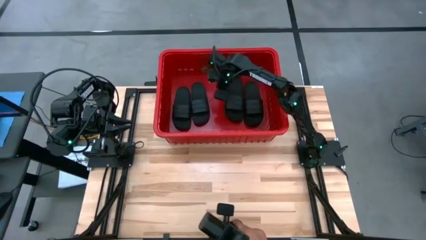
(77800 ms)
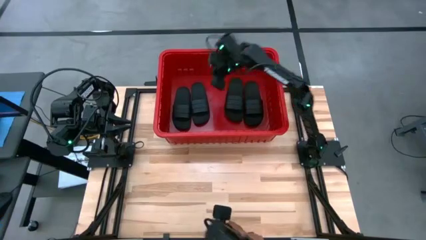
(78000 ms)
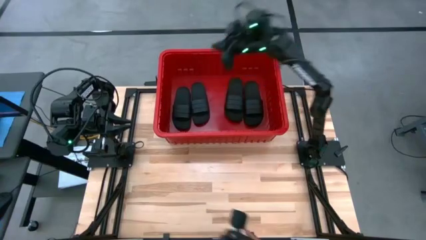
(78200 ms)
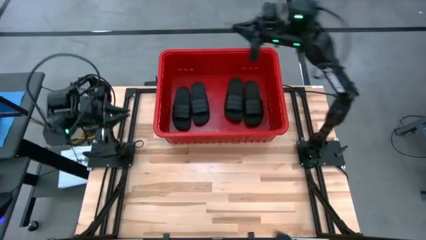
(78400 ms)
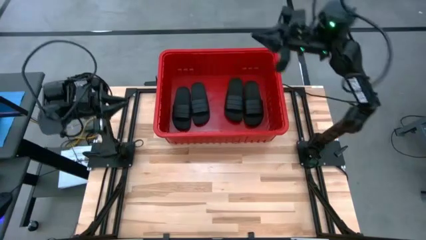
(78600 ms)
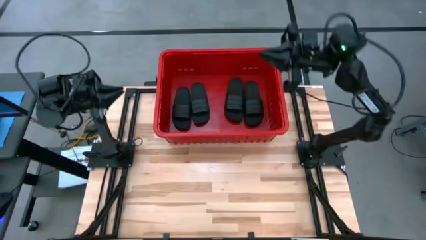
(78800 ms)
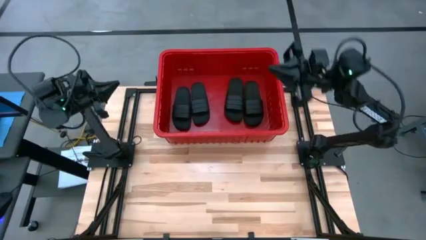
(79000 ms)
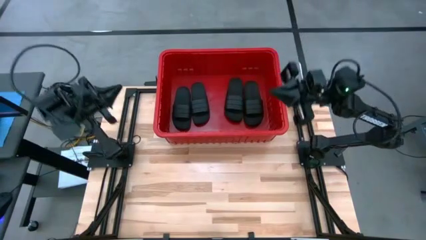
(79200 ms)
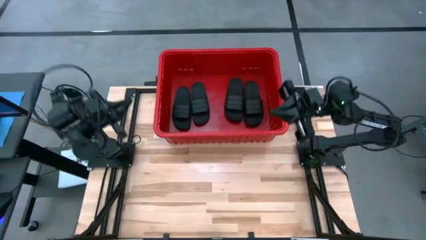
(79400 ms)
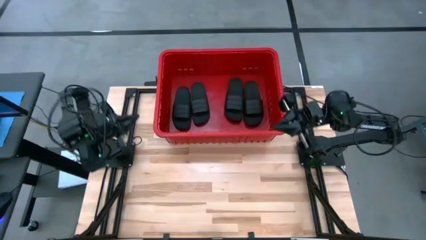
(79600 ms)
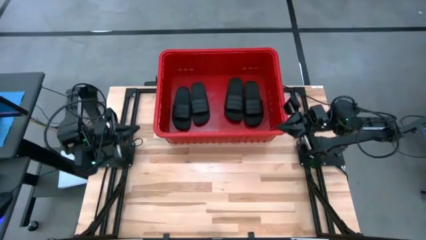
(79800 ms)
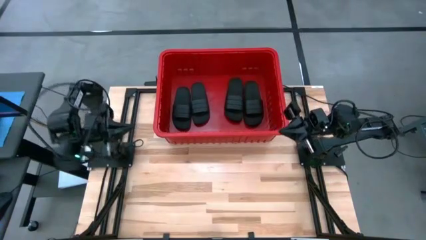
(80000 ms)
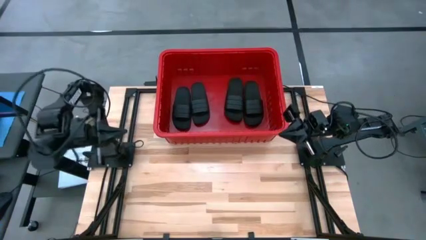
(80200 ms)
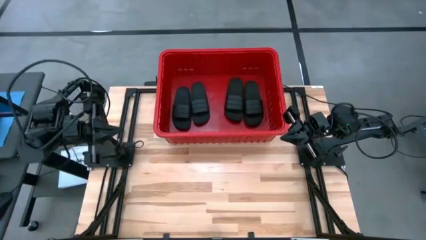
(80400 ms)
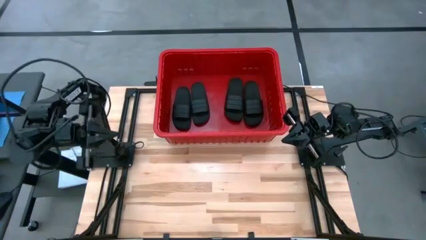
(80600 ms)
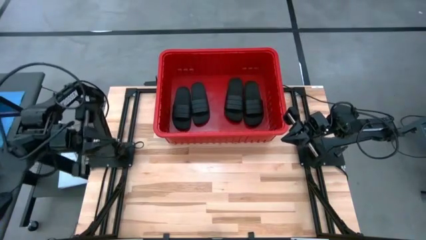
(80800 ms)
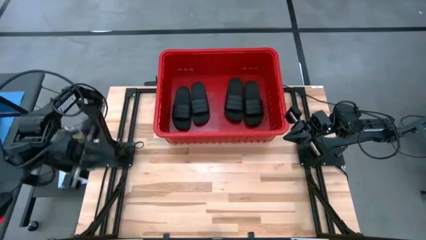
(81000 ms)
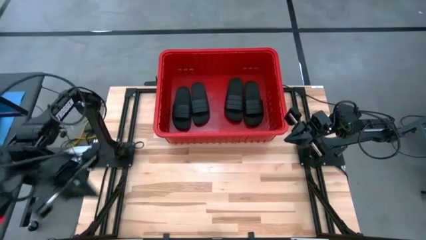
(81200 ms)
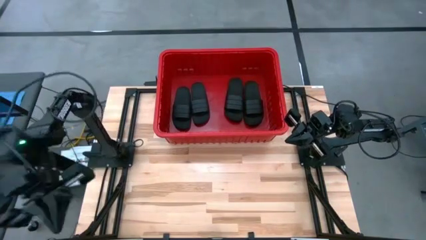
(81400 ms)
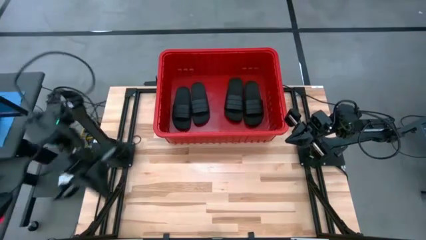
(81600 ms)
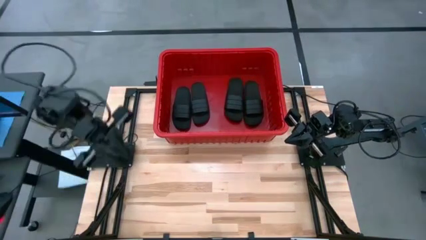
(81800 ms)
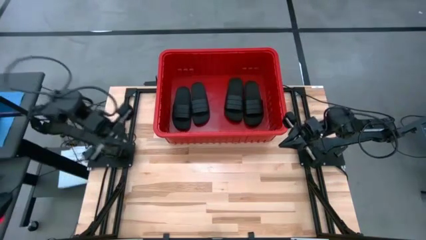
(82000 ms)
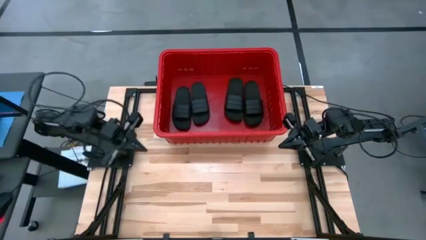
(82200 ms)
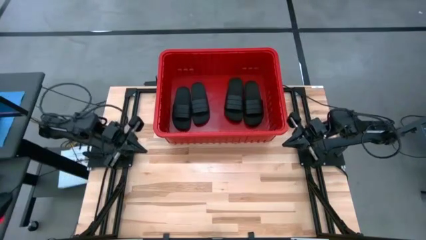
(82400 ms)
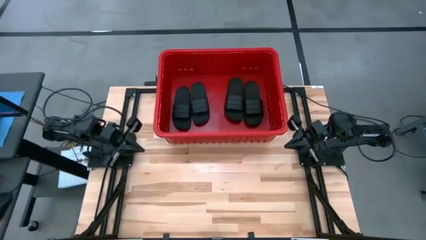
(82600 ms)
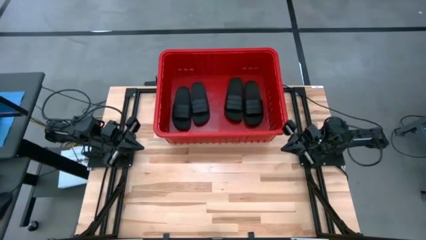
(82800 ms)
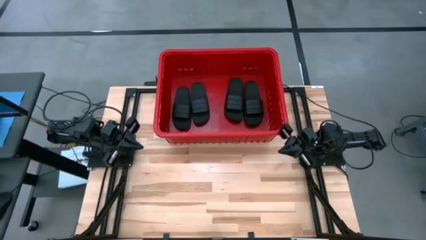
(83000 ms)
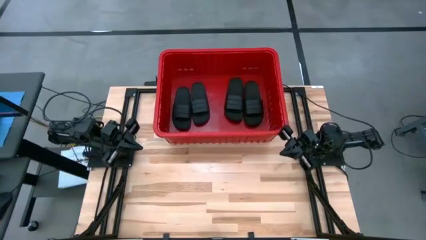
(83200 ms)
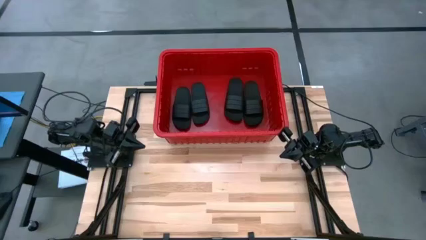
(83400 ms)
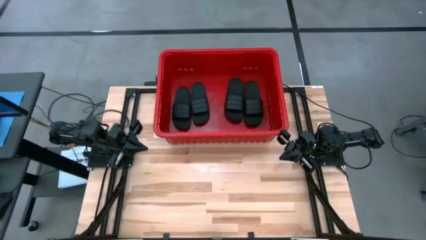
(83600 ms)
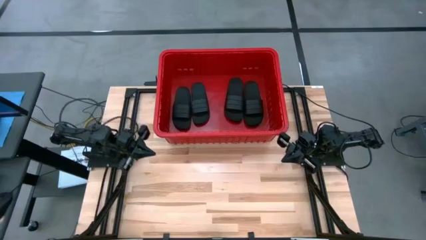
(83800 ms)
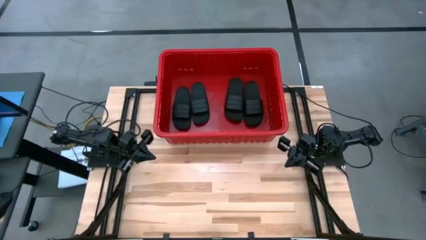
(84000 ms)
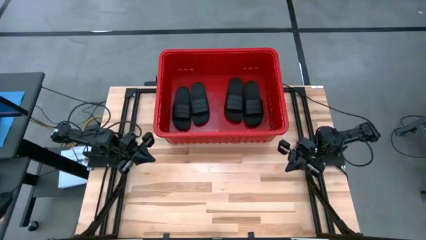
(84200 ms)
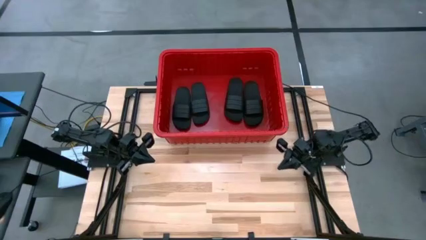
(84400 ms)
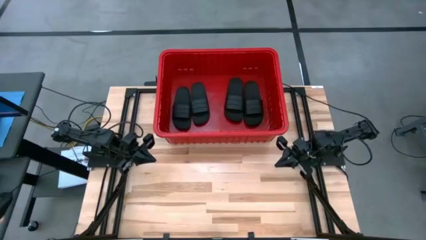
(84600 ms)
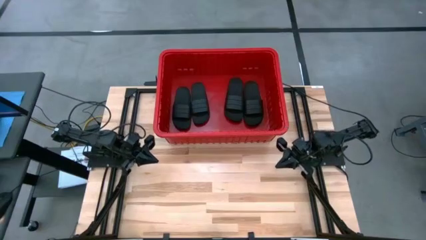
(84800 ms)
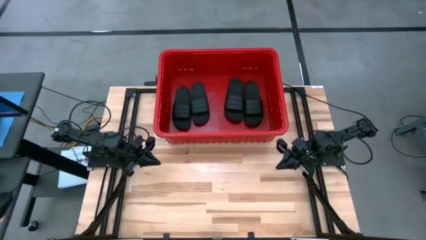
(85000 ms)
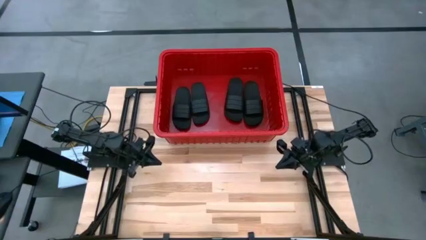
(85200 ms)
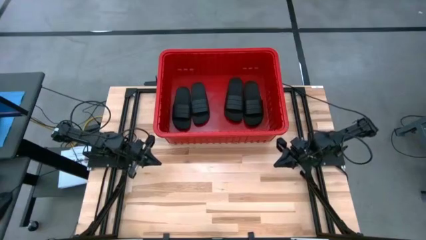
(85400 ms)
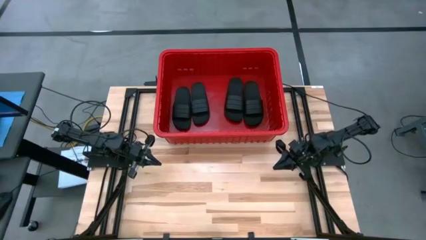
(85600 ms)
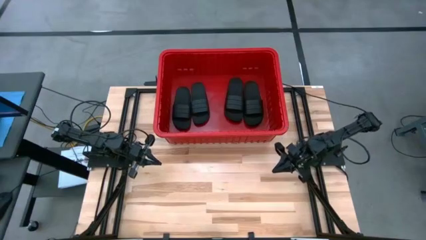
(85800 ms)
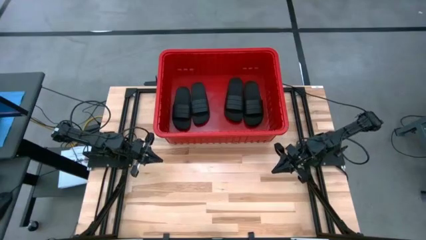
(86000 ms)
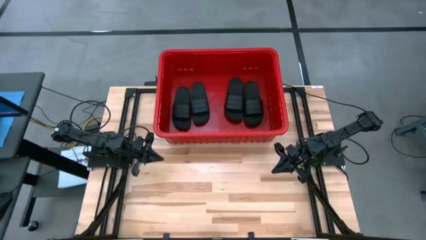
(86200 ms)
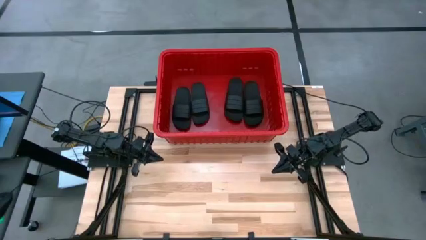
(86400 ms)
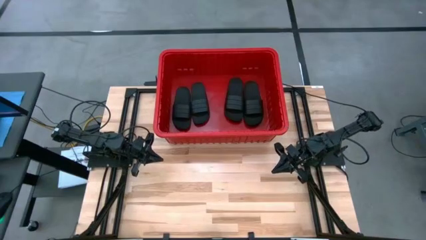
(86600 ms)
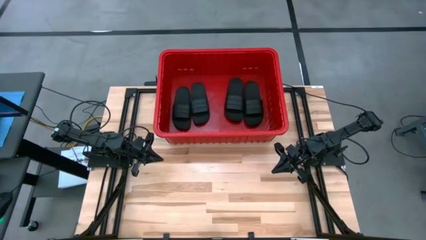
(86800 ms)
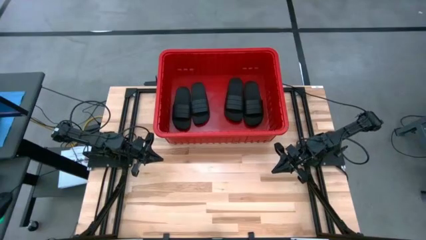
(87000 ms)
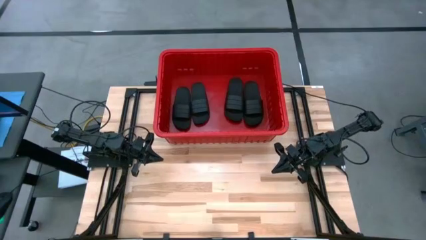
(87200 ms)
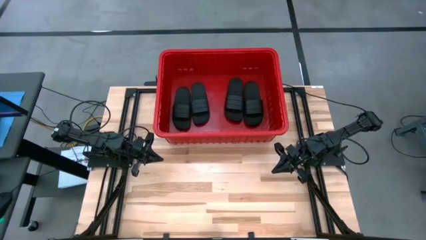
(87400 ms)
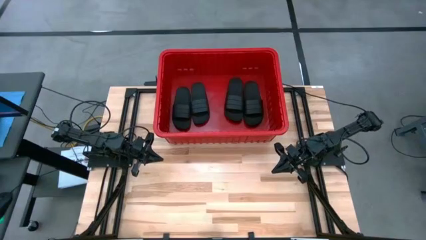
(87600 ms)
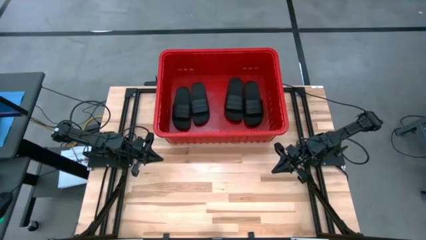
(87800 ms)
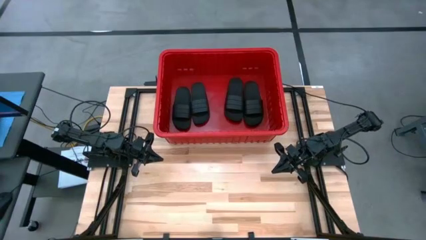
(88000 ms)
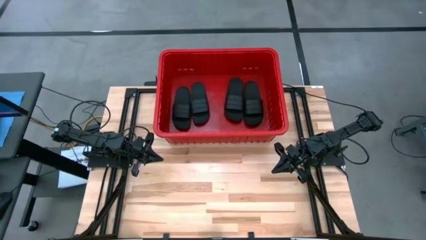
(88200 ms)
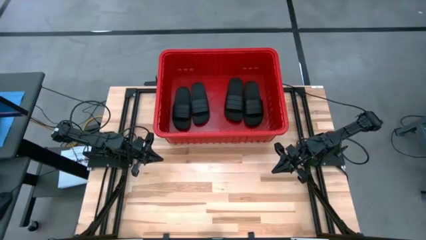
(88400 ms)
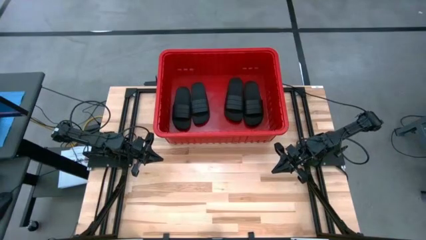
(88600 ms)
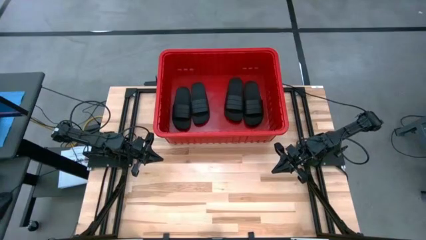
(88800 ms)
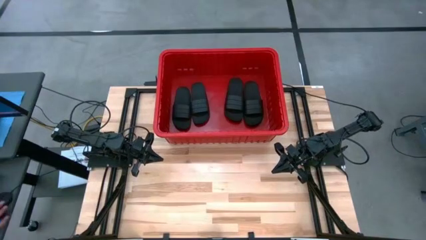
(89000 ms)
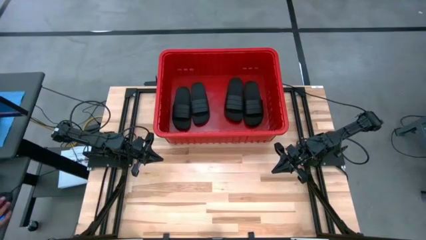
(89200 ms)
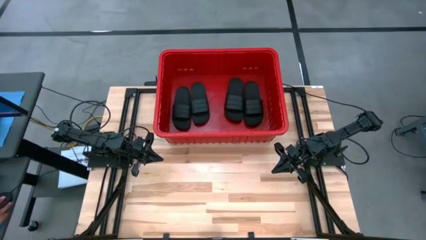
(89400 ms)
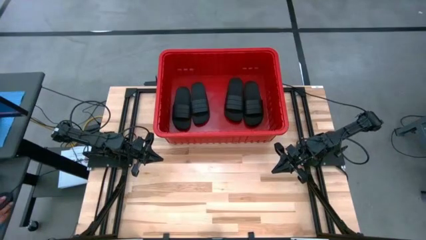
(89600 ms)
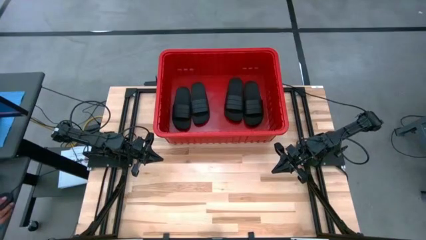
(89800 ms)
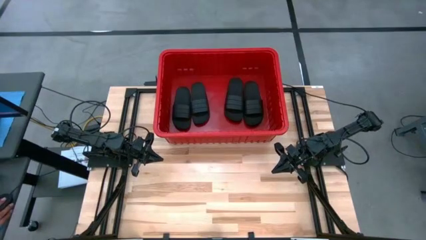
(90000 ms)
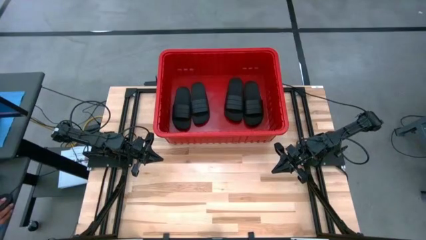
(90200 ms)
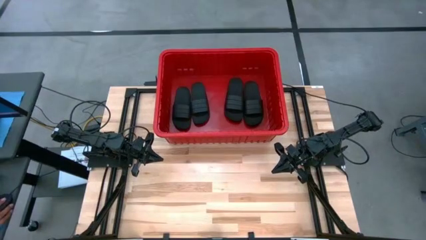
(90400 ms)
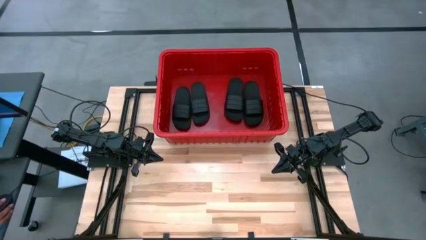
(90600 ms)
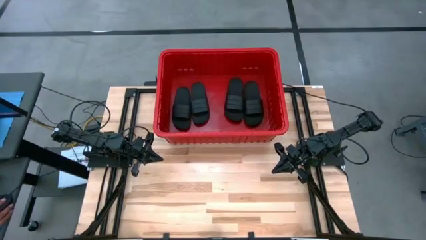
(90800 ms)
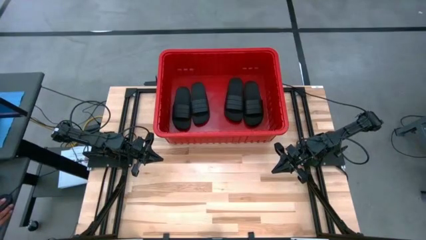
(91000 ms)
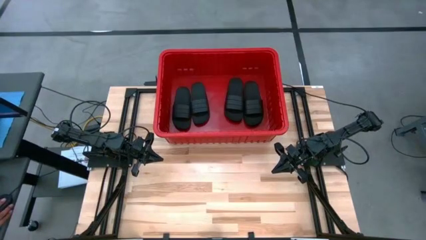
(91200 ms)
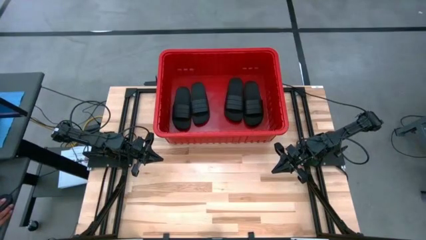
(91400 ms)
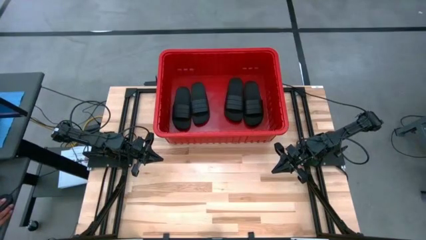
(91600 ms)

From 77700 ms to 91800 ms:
Task: Pick and place slides into bin
Return to Home Position

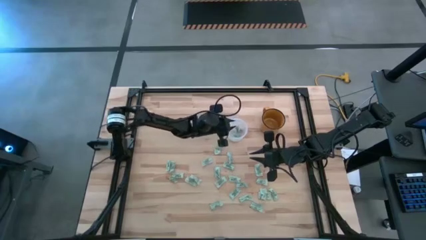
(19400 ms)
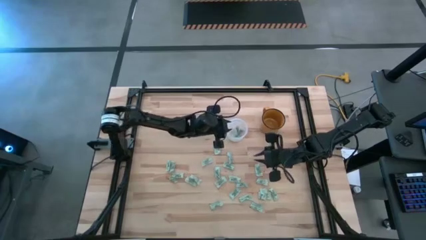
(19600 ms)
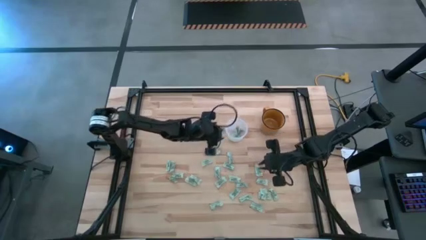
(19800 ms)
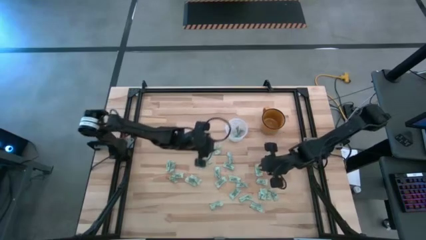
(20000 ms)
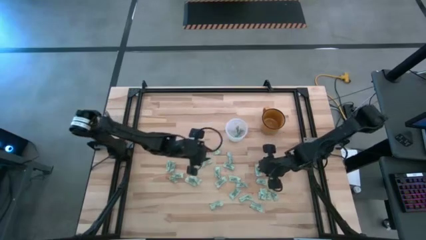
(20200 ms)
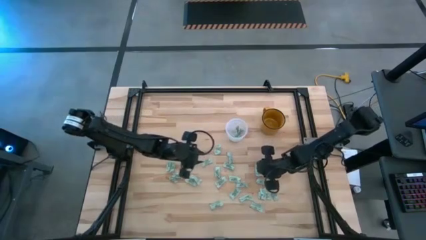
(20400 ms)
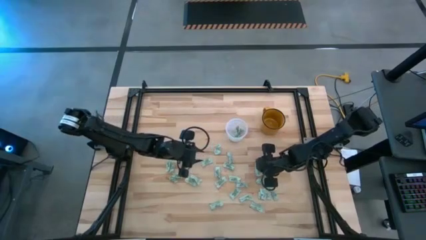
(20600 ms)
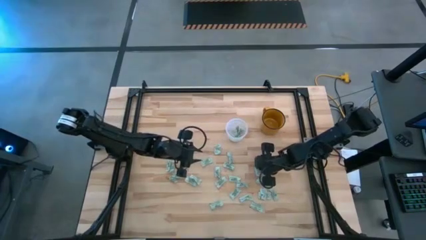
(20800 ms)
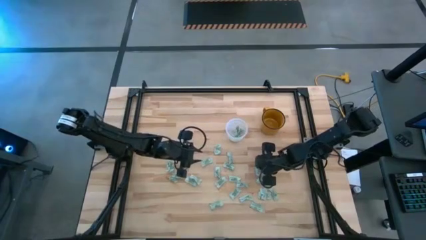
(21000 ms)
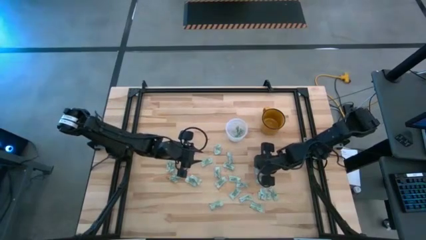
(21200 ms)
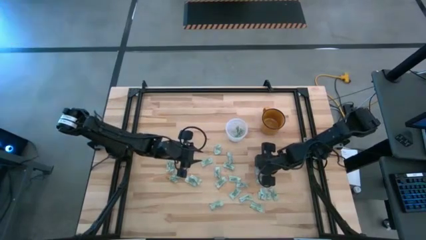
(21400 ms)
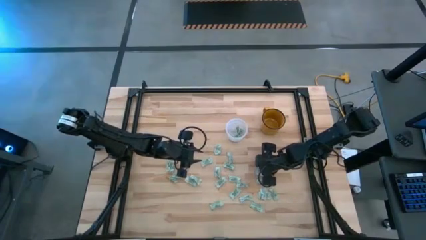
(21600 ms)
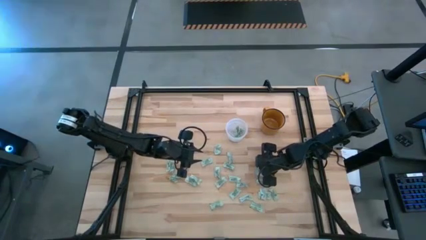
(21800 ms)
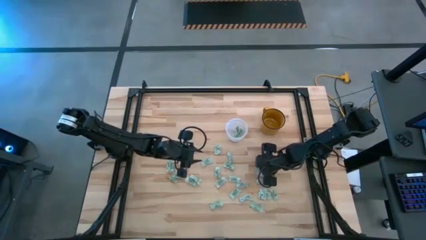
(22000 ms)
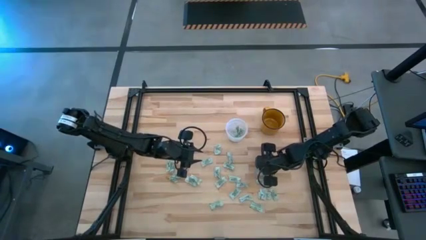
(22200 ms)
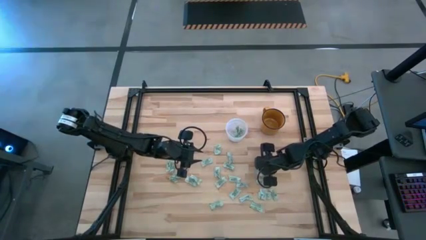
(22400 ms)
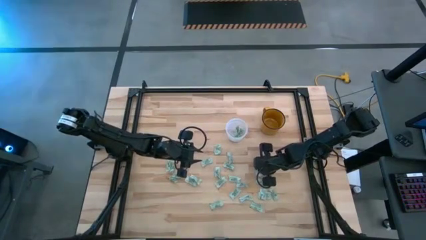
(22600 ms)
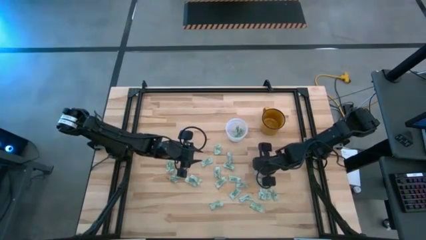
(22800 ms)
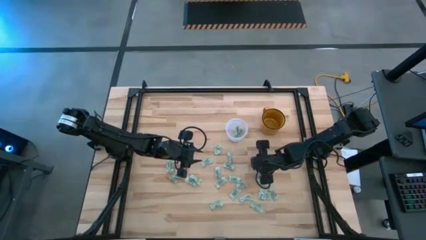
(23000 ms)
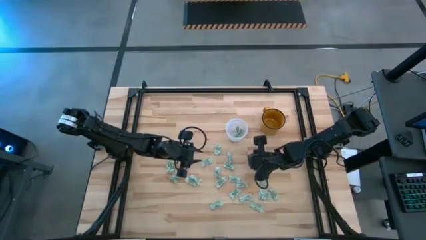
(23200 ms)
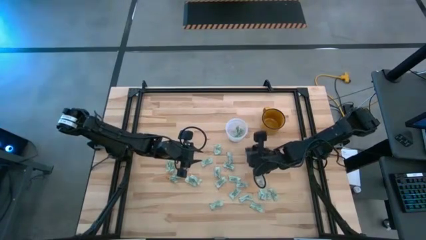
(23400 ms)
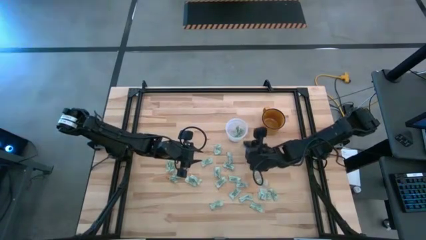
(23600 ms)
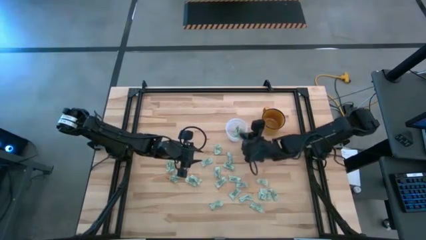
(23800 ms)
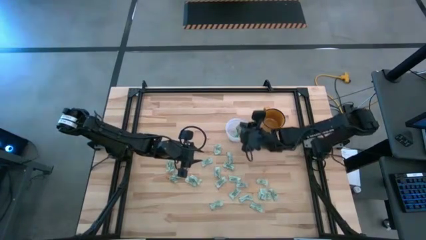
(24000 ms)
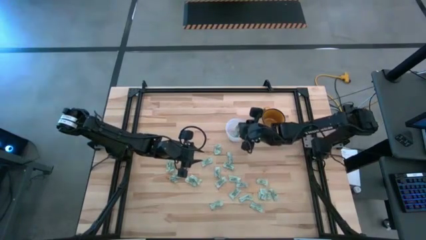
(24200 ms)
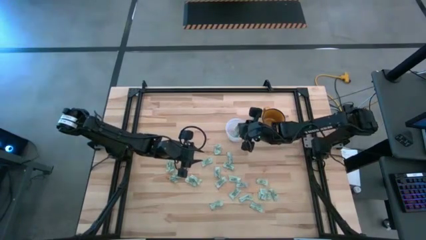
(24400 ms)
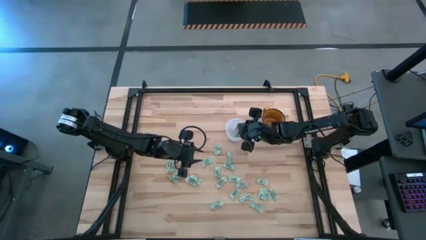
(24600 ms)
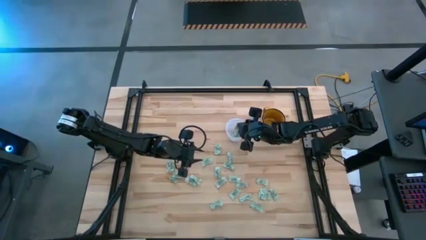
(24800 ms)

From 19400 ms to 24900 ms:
Task: Pick and place Stevia / Truvia into bins
Put the green stevia packet into the transparent bin
